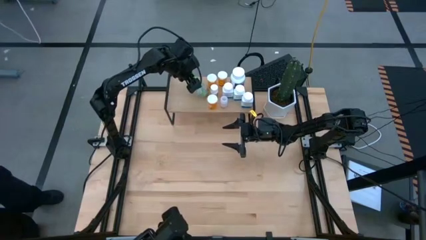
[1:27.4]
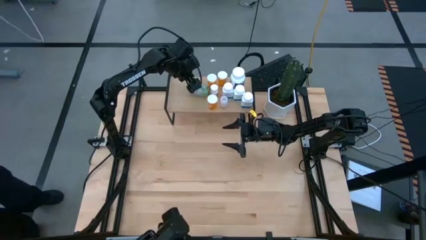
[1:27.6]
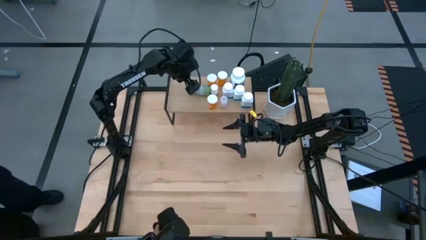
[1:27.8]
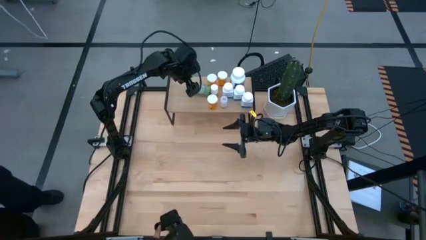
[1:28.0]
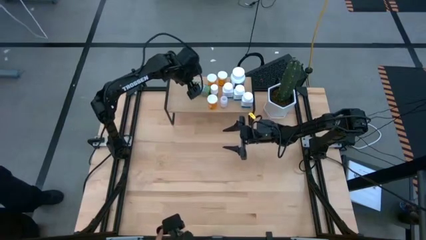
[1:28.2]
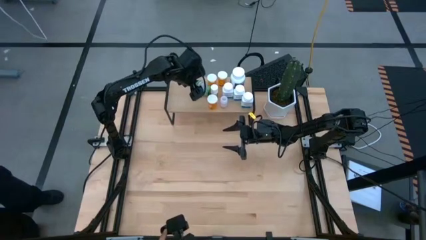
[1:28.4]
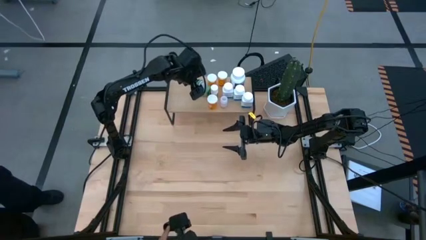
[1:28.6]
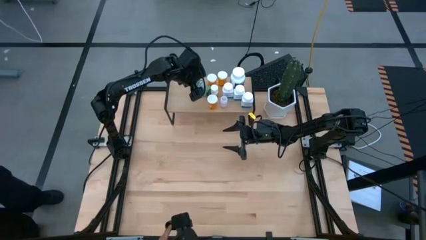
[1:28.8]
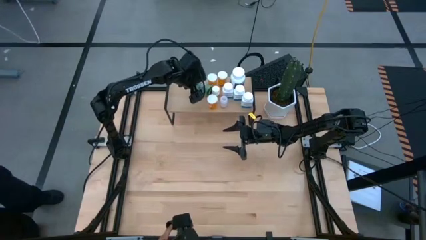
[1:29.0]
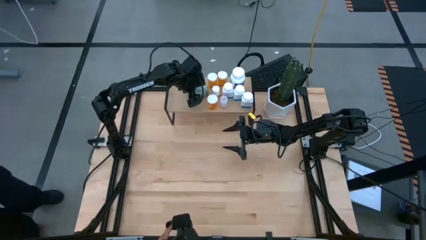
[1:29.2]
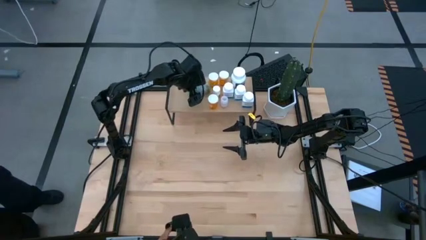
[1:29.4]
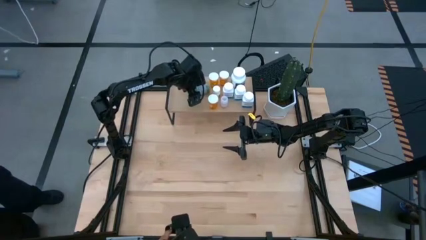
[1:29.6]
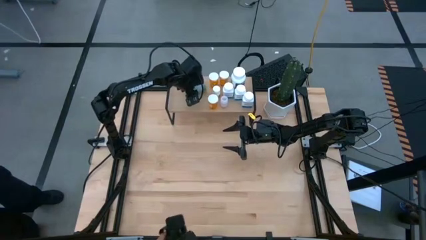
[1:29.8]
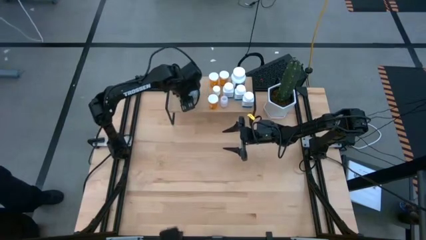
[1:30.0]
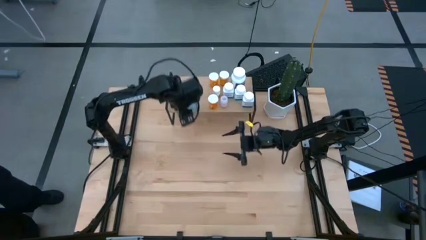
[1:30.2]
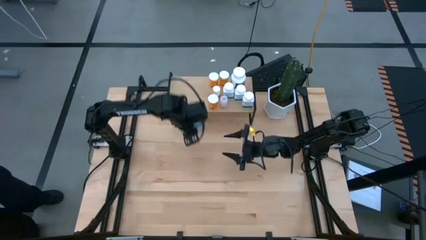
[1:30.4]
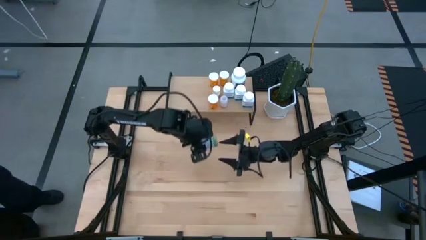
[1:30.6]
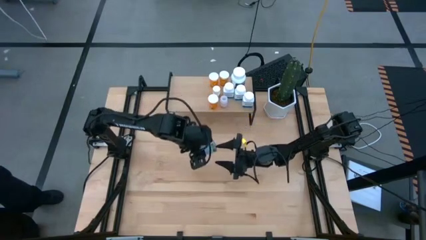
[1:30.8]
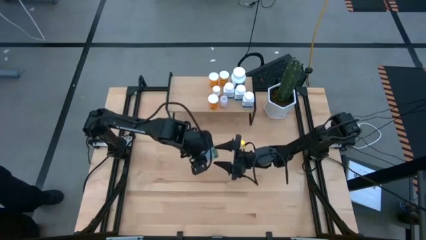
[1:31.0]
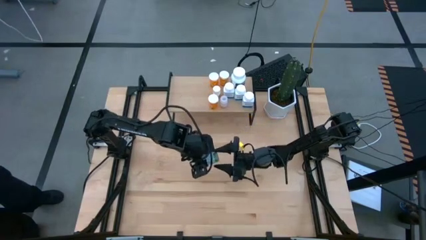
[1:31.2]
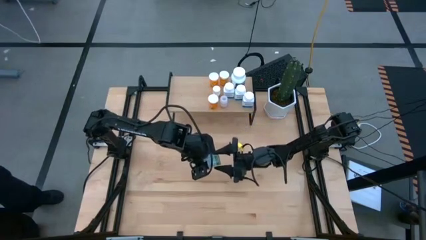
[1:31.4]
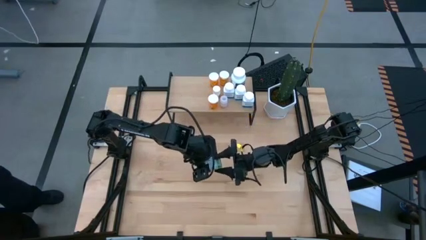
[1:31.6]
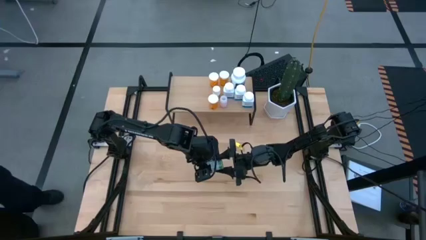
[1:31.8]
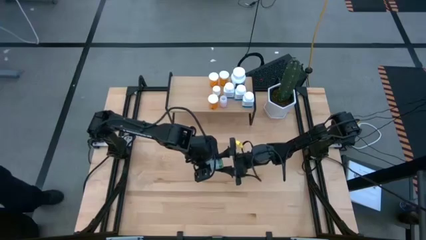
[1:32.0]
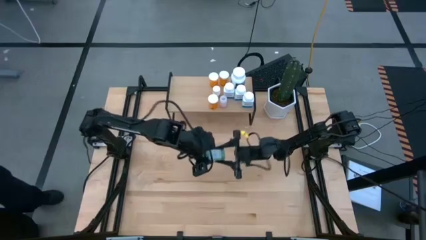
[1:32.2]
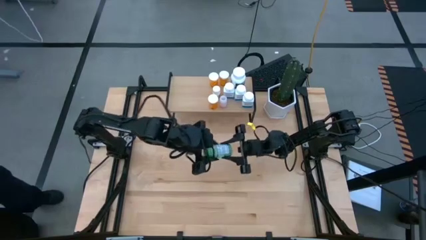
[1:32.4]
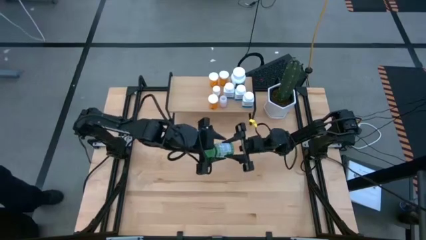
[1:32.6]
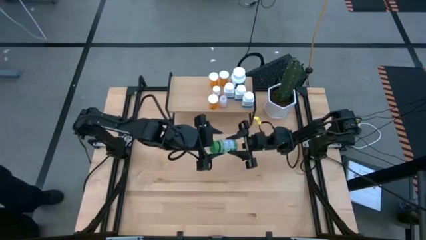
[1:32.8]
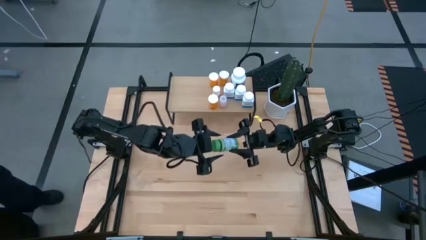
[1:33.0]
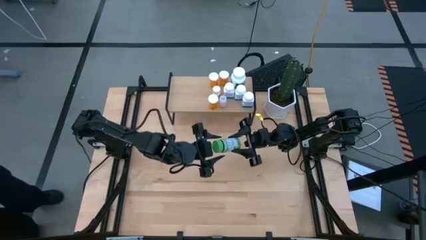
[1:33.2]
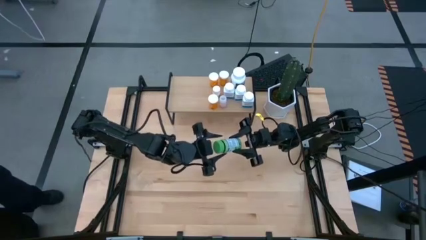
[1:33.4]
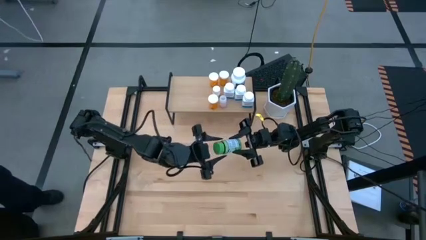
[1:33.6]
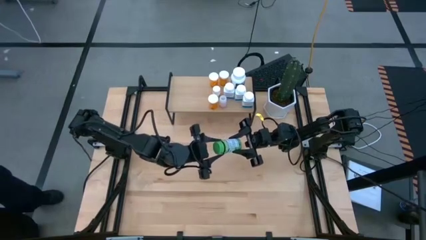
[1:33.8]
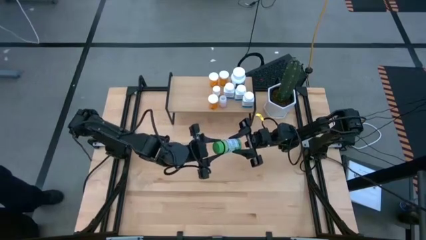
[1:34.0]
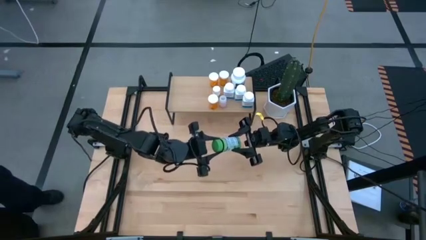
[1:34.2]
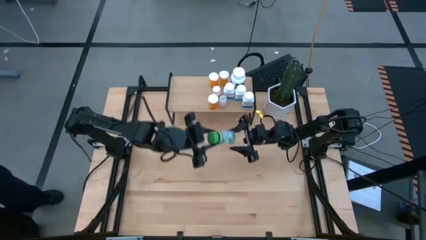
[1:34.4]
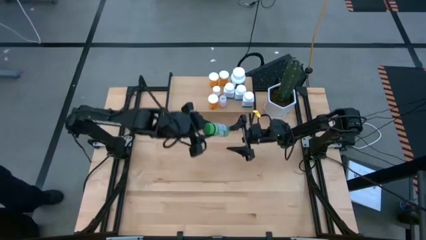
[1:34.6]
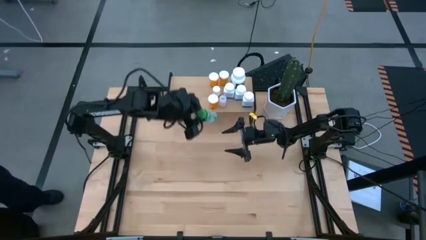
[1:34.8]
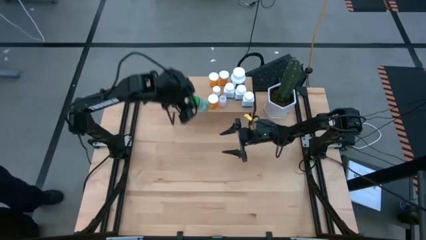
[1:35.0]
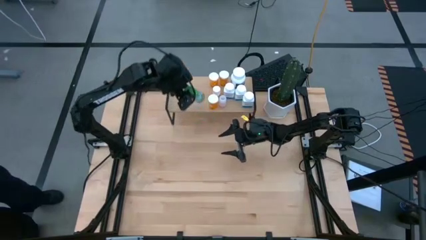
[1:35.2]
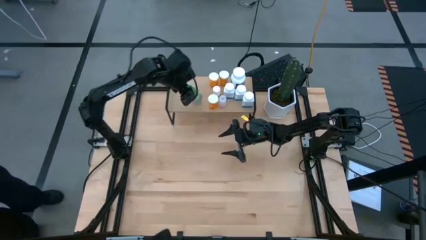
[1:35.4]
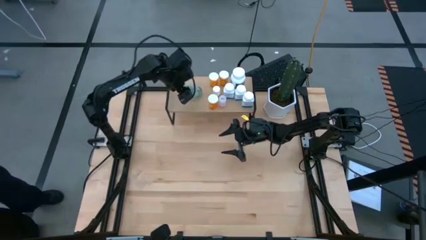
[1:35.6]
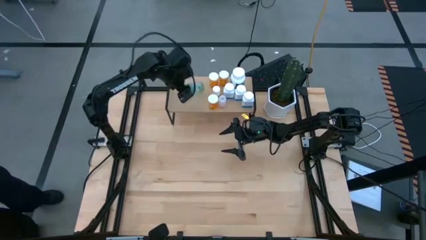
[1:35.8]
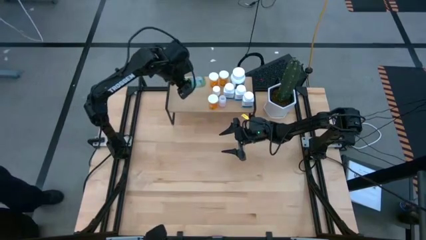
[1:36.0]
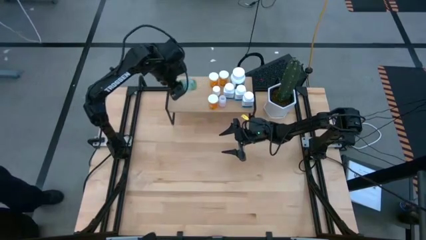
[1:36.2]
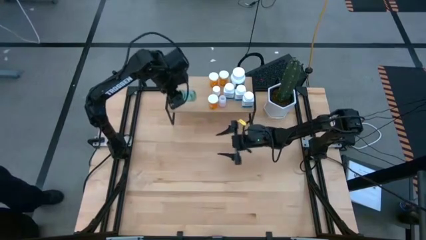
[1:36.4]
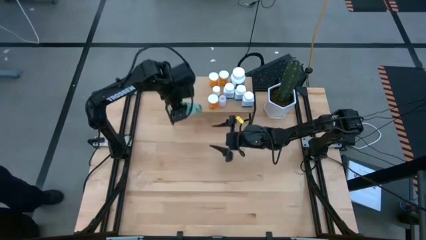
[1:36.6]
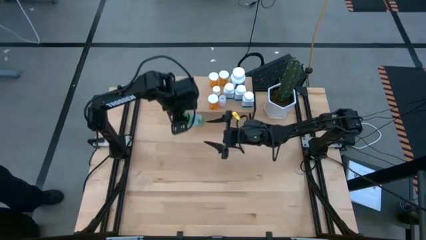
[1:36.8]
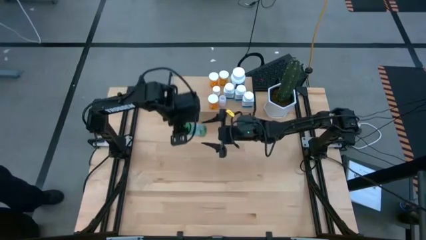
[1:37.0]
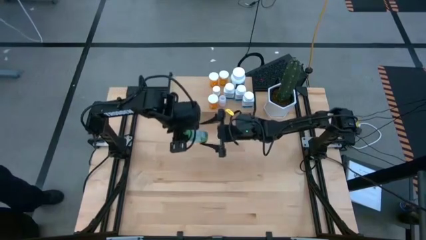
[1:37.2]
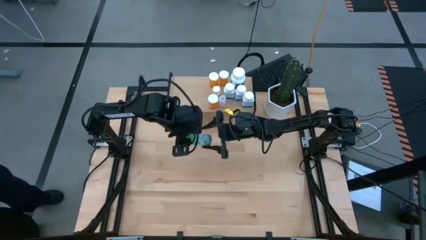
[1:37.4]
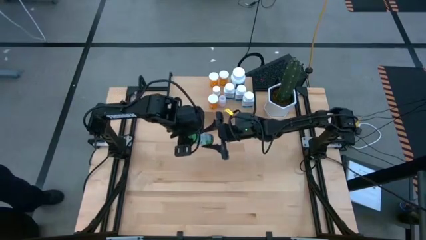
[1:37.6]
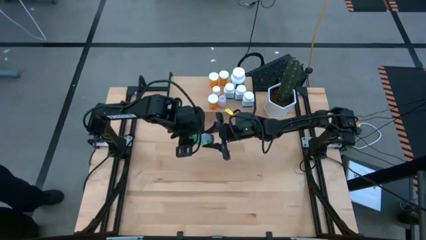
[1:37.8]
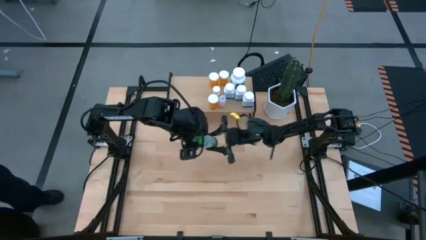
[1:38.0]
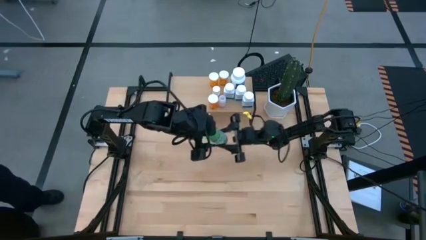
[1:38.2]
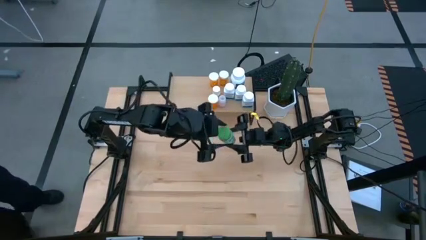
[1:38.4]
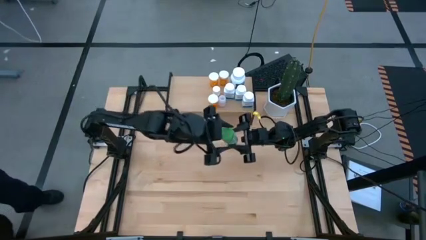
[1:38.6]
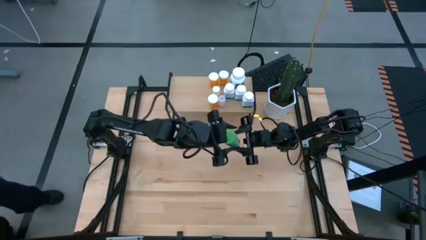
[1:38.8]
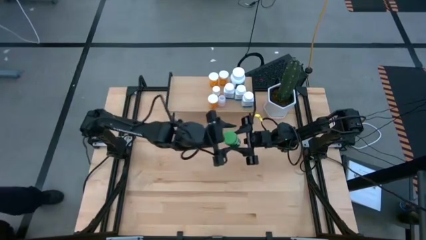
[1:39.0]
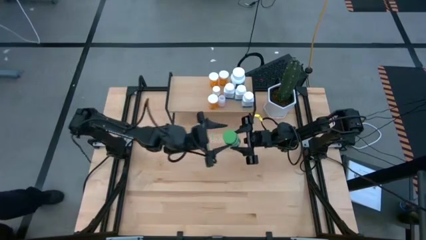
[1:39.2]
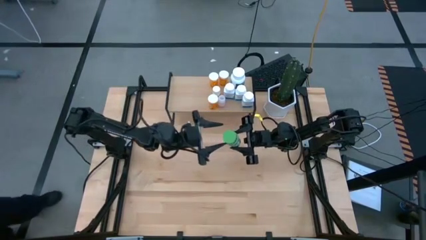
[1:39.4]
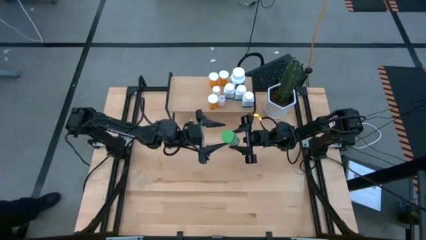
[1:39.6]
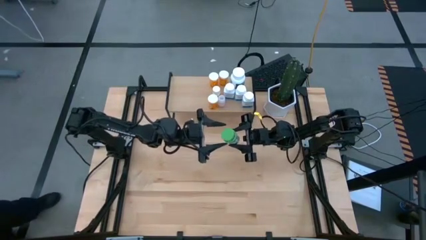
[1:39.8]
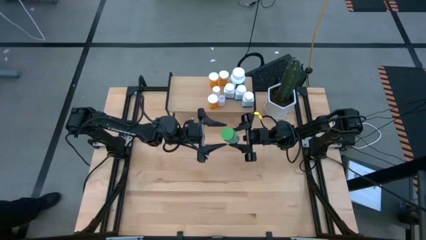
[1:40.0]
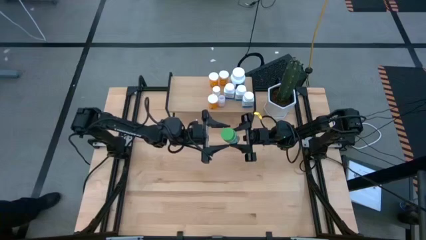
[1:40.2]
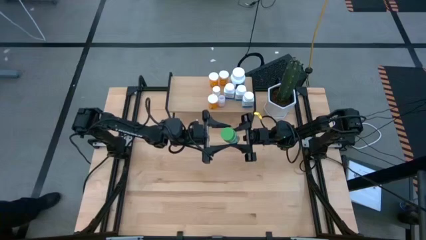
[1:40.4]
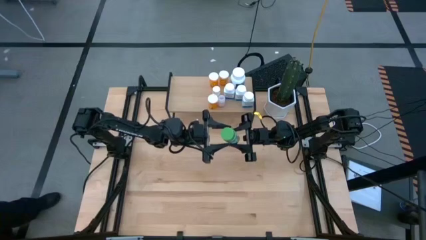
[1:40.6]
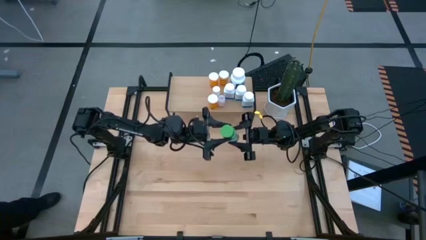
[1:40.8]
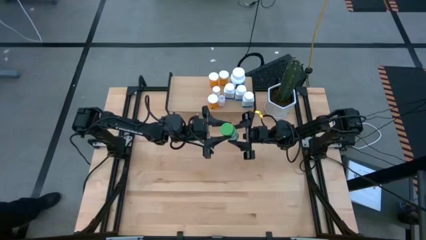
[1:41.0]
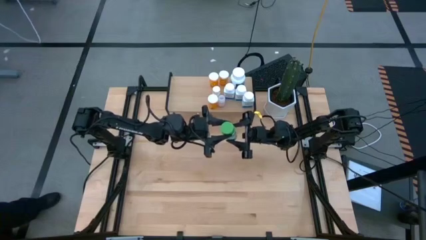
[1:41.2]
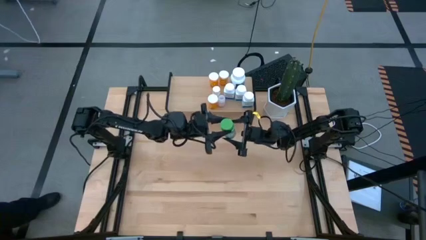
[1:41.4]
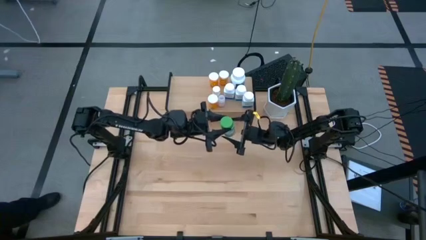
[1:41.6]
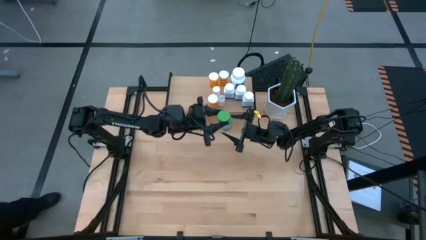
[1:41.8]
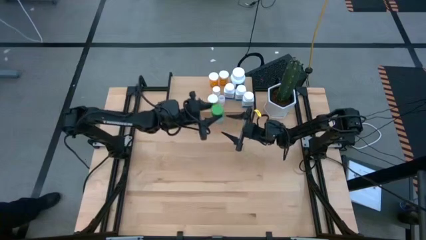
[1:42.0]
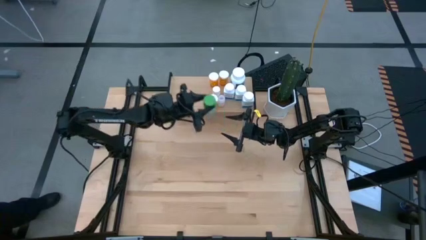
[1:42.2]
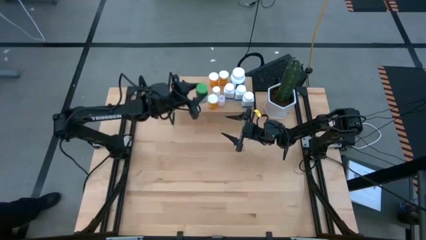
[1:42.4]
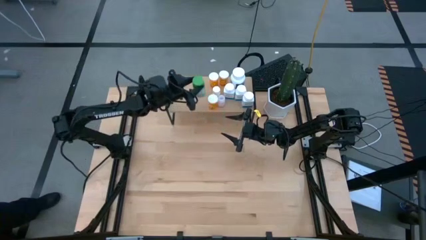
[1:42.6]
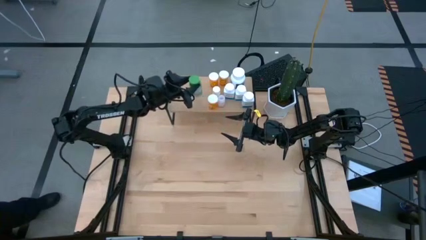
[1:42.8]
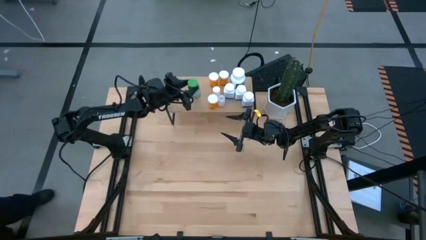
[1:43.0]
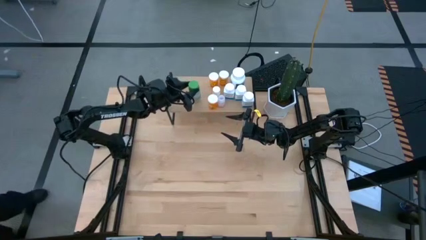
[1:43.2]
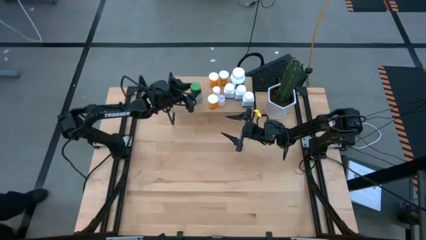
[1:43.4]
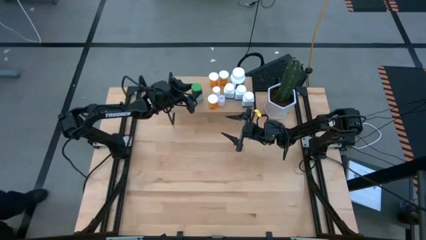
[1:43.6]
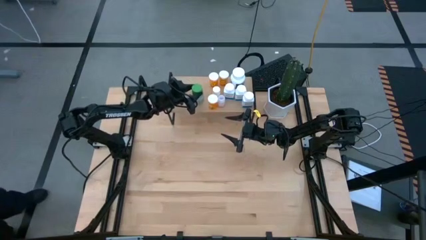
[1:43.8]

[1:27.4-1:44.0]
Task: Pick and place medicine bottles onto shelf by color
Put the green pill bottle on the shelf
